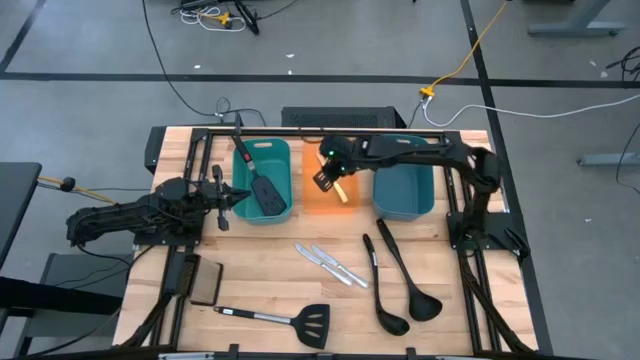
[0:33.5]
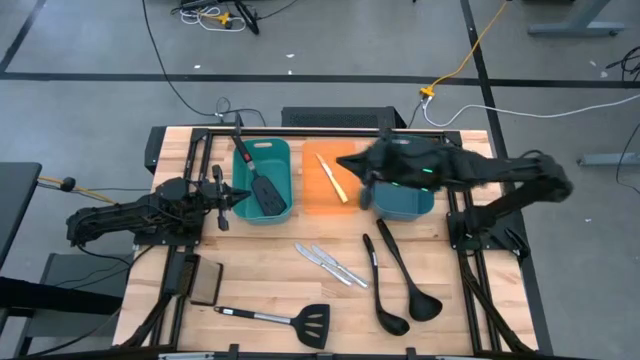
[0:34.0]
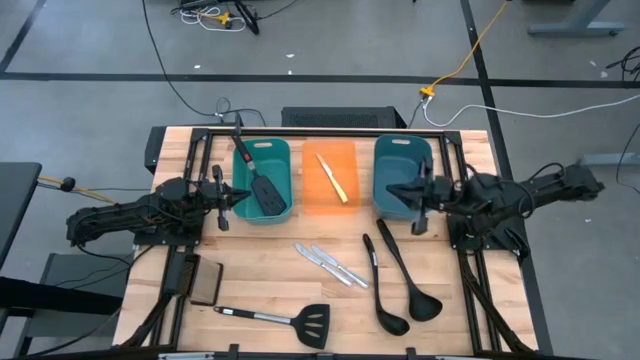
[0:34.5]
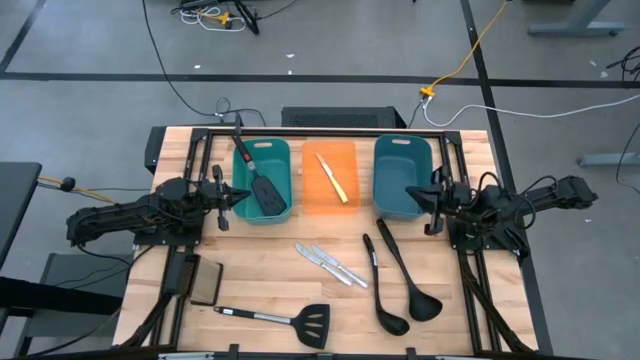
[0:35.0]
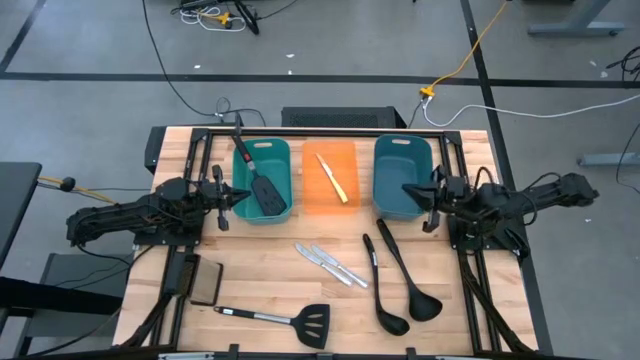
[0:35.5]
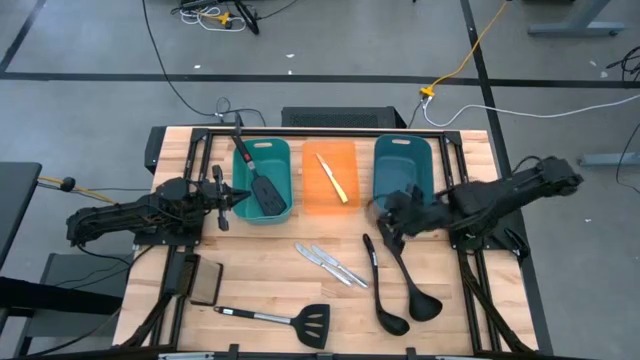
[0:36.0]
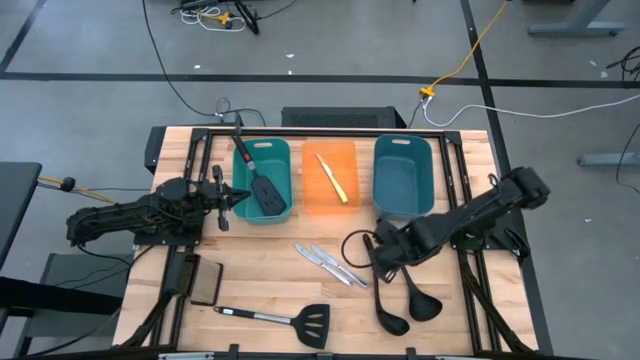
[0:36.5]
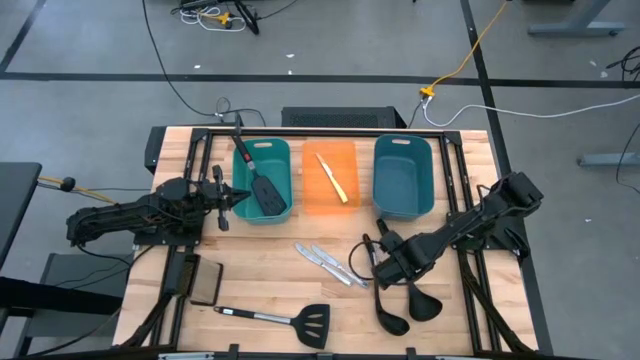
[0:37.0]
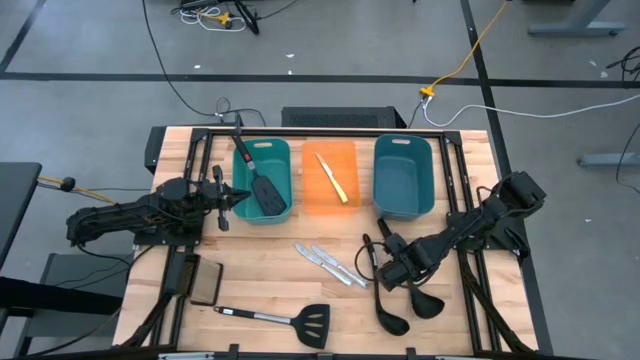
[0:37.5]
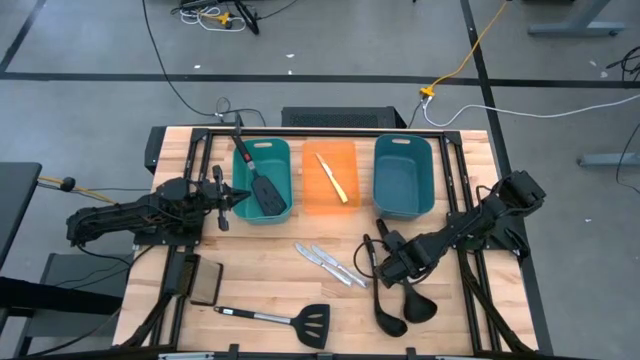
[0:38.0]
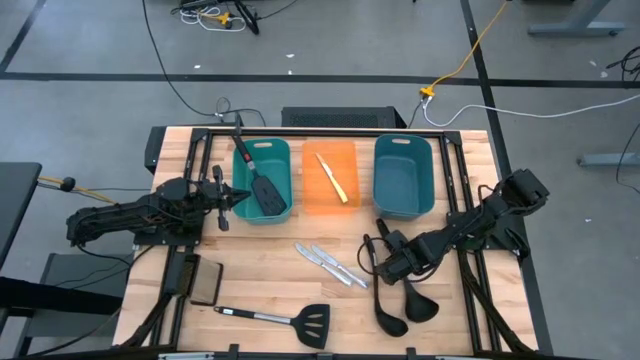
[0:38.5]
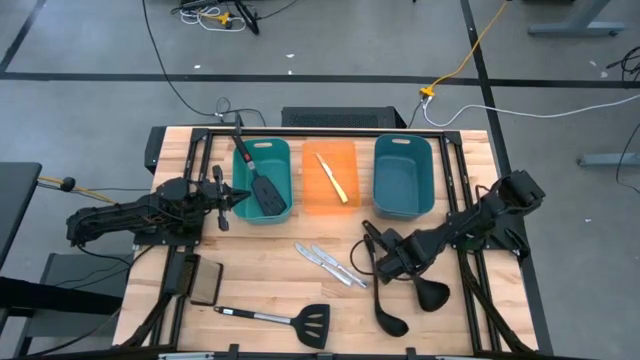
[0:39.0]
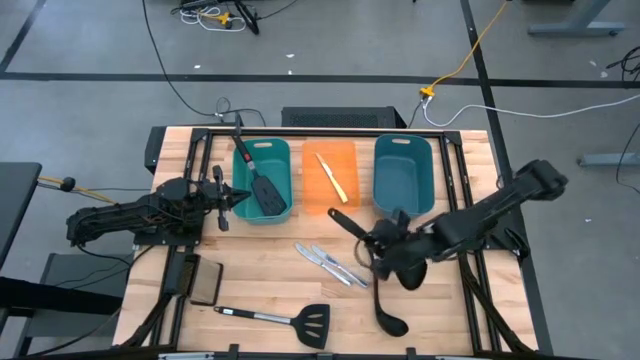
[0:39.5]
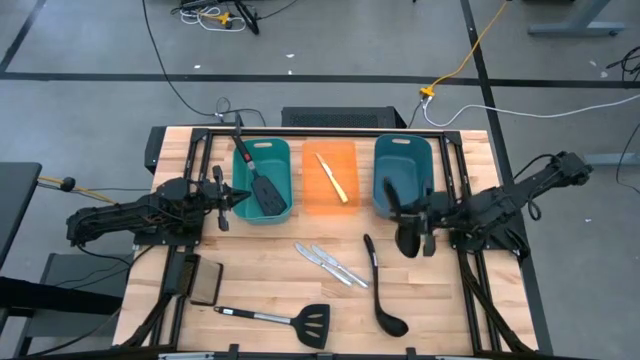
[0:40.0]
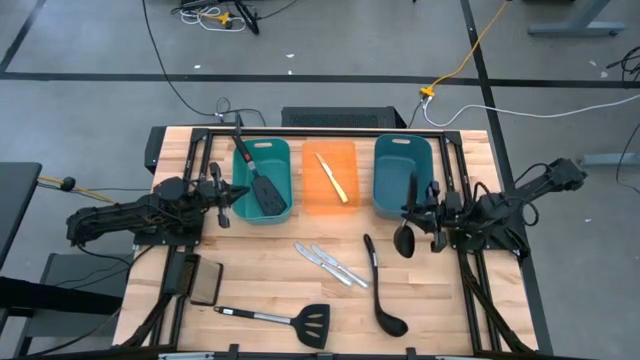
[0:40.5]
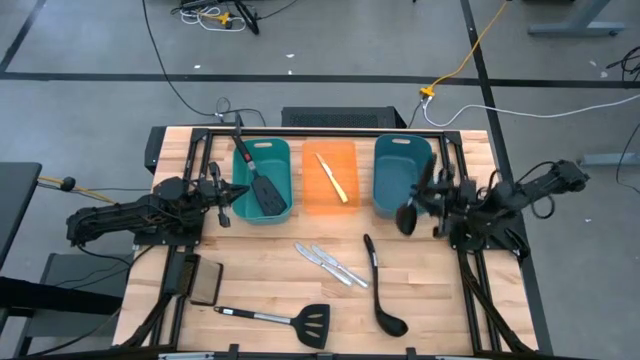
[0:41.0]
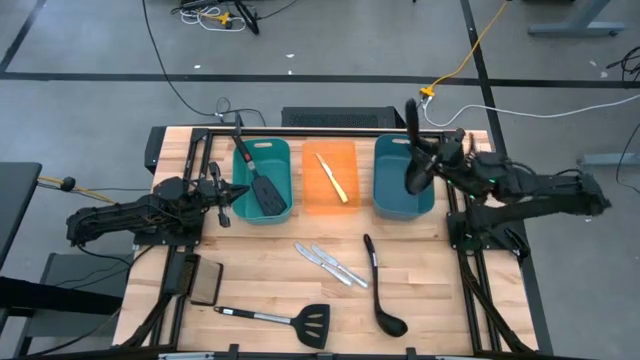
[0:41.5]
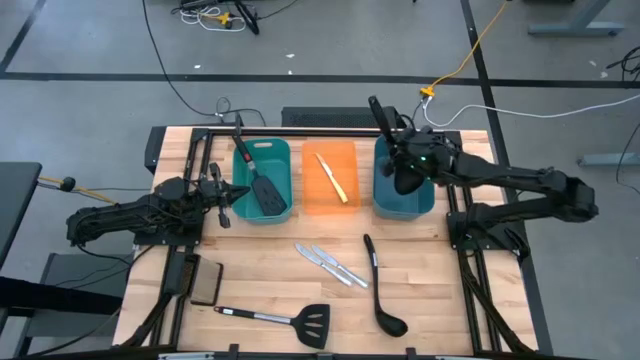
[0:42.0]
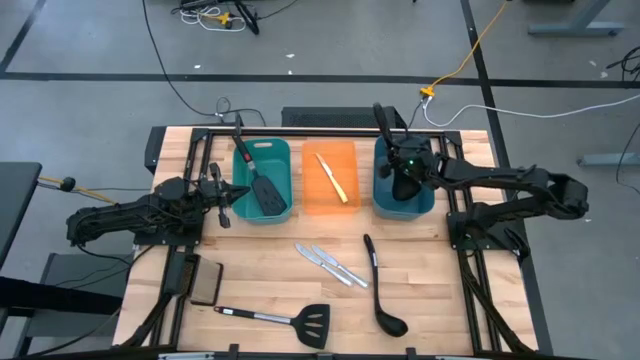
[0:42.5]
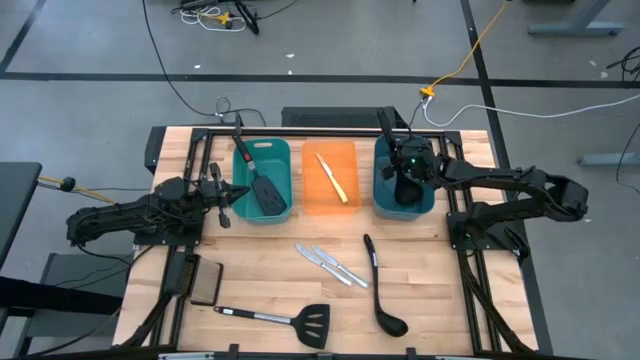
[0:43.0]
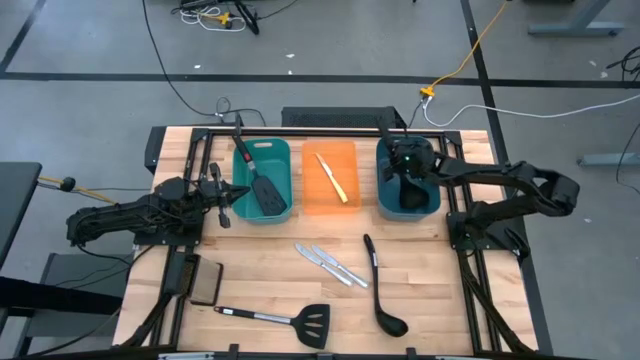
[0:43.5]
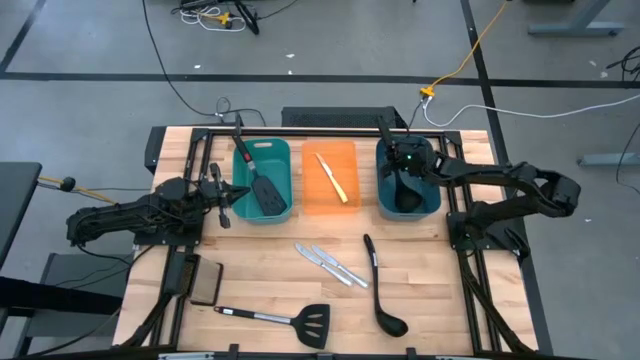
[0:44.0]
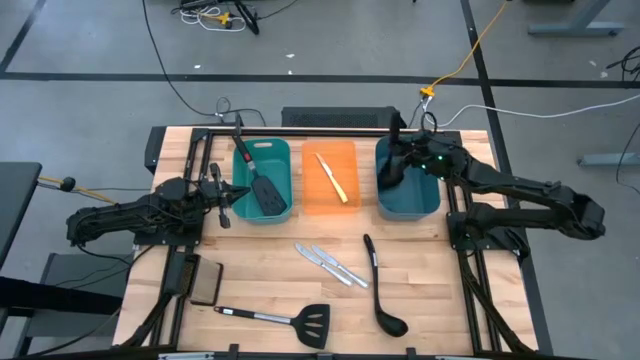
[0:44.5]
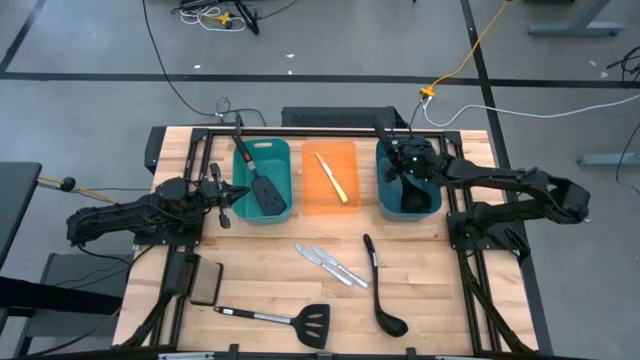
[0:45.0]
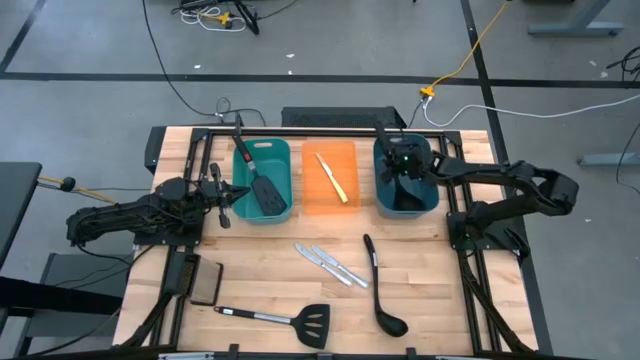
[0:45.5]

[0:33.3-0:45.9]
Task: Pick & Place Kitchen Items
Put the right black spoon into the dark green bin

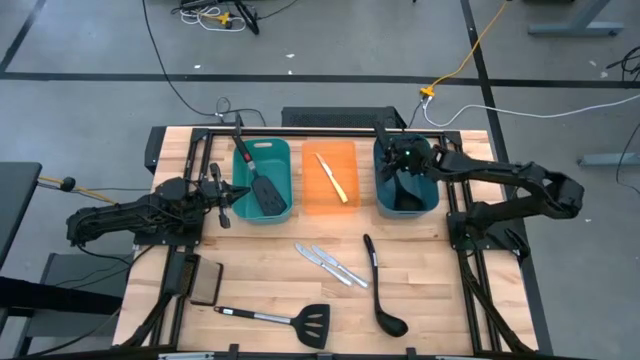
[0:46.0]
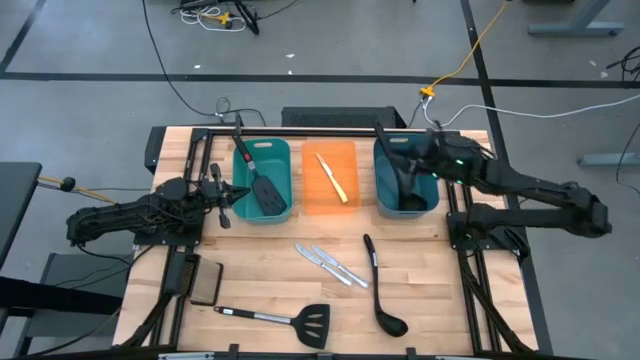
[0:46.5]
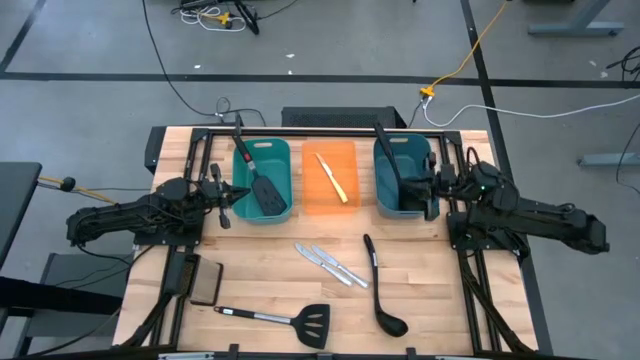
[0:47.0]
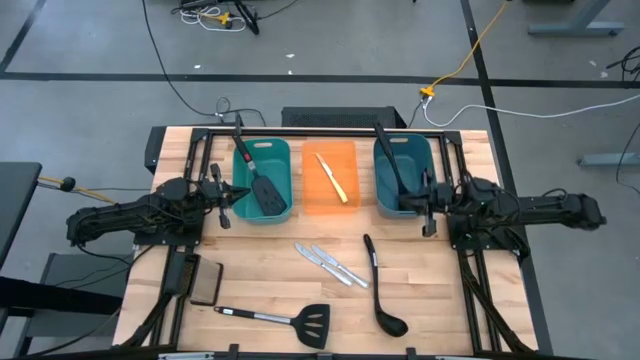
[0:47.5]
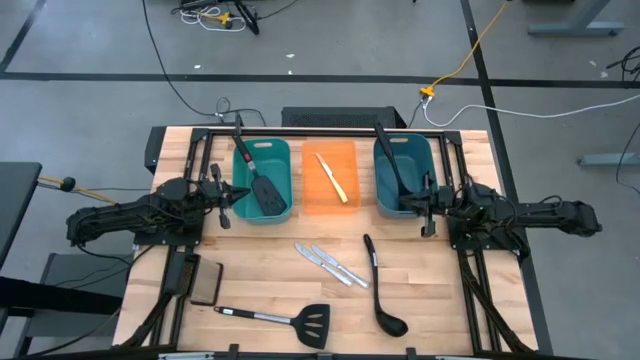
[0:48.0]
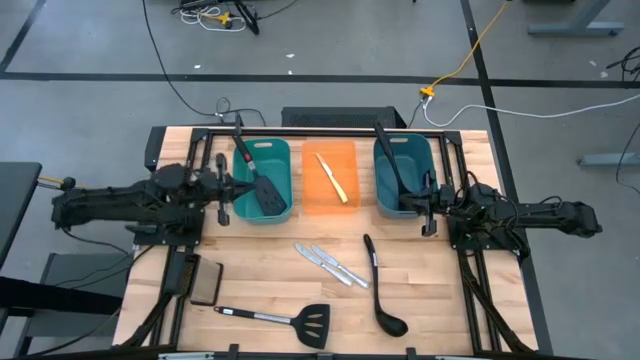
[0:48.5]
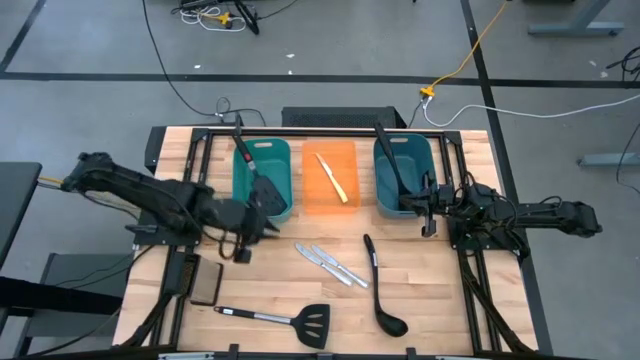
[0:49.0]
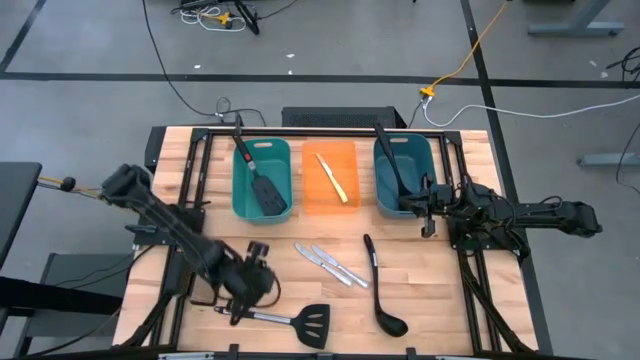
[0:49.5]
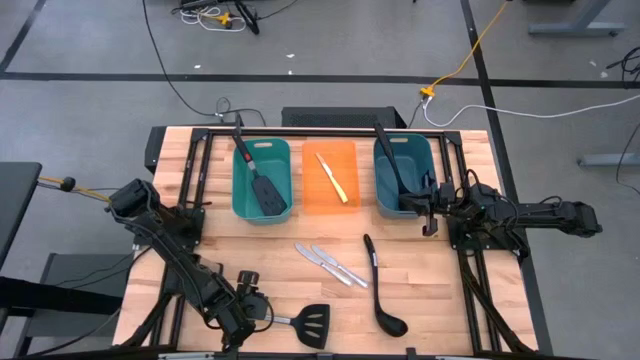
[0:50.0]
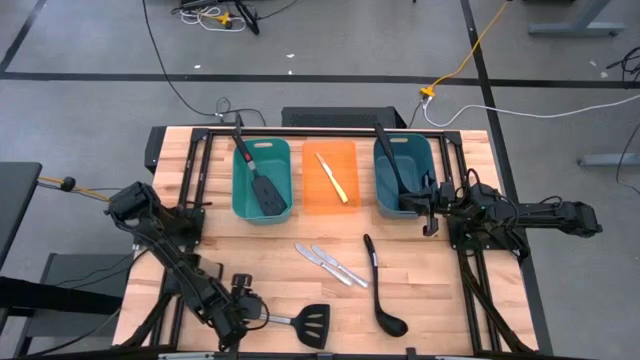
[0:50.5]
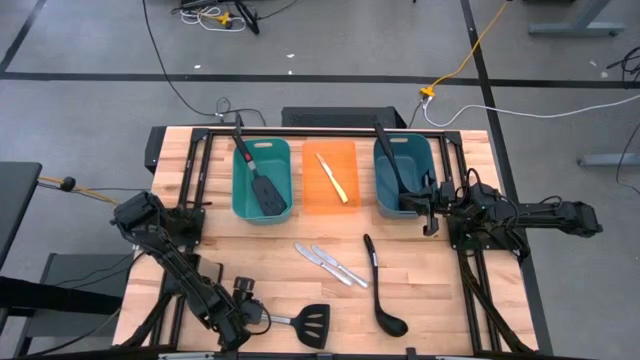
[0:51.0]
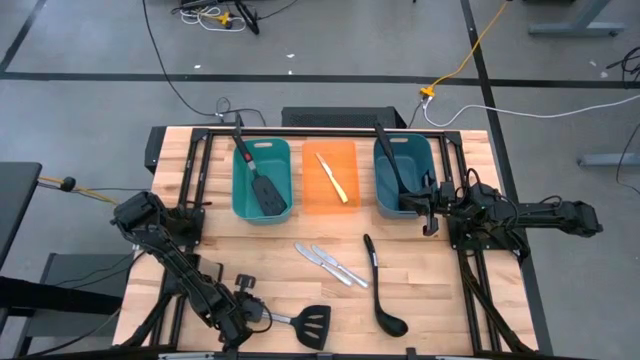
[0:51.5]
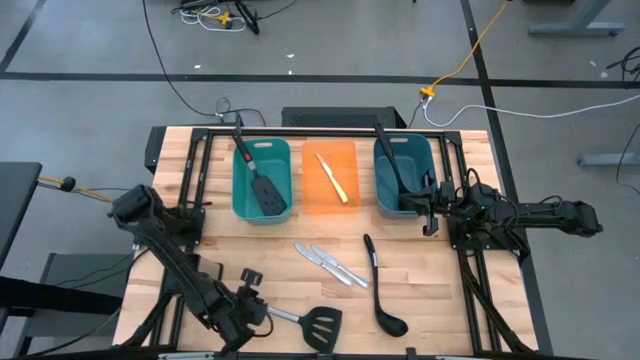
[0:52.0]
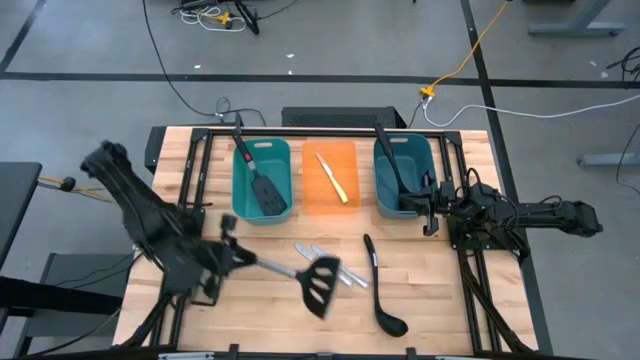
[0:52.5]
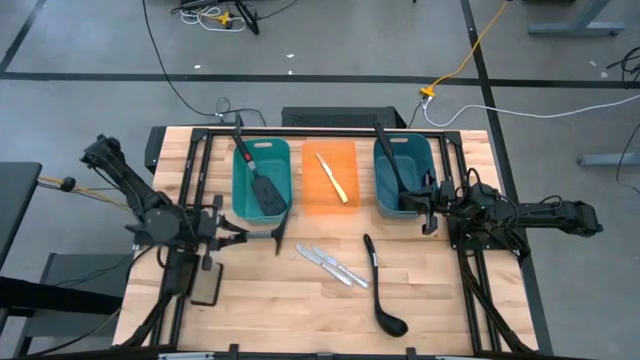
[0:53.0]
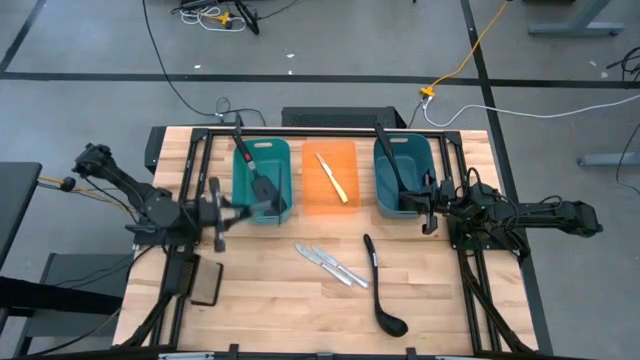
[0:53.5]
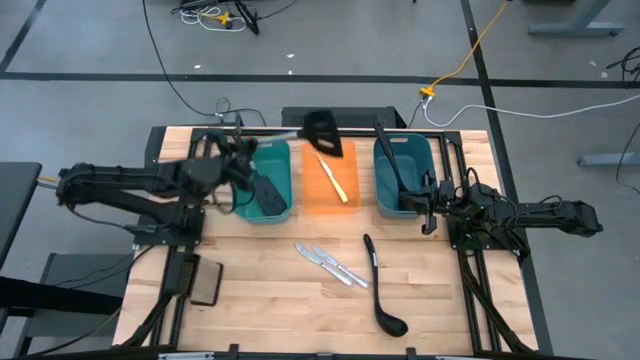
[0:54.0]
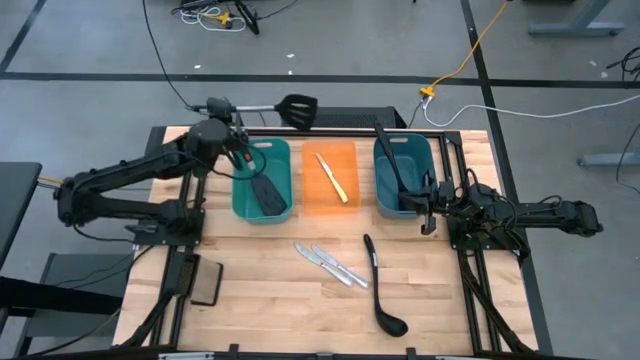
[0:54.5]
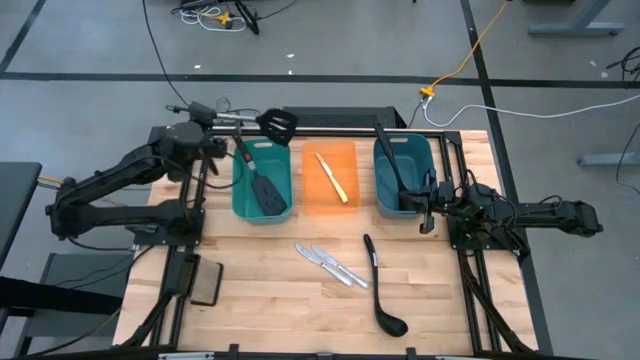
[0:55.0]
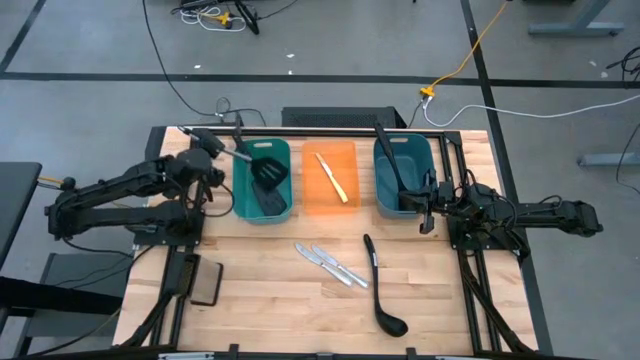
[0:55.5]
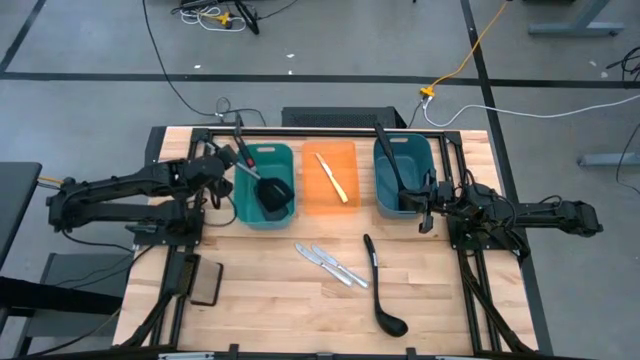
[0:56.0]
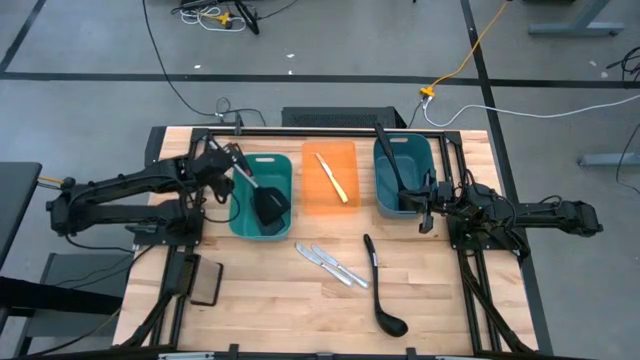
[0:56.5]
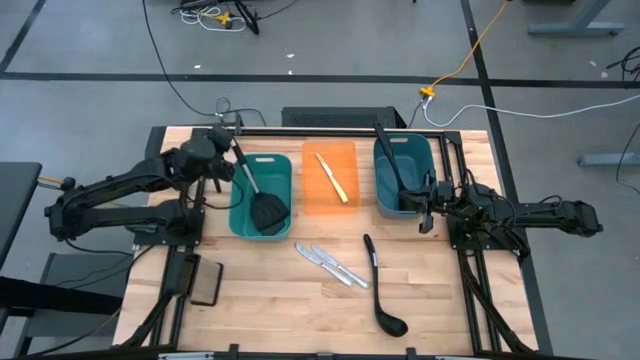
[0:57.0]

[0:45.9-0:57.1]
Put the black spatula into the green bin
